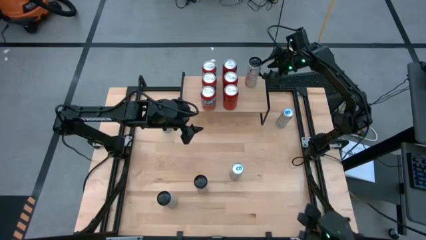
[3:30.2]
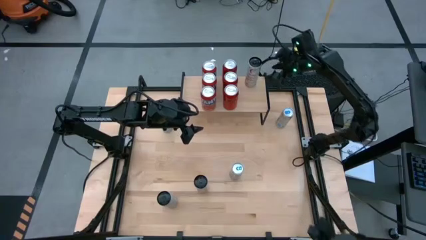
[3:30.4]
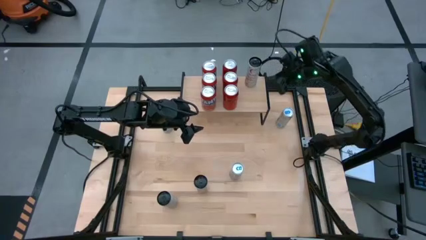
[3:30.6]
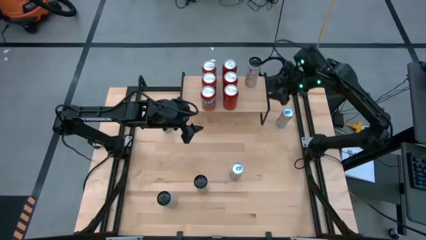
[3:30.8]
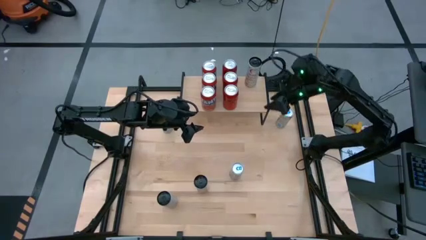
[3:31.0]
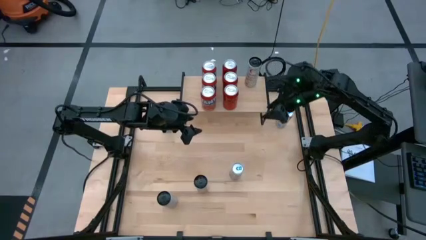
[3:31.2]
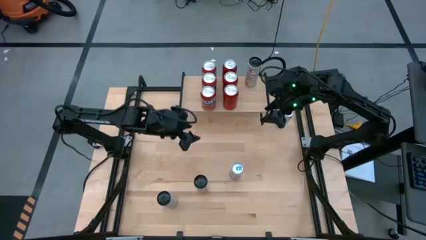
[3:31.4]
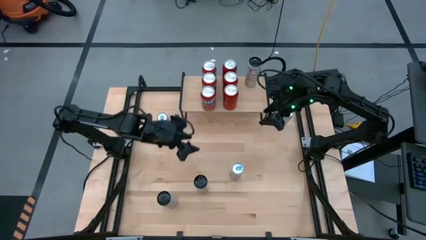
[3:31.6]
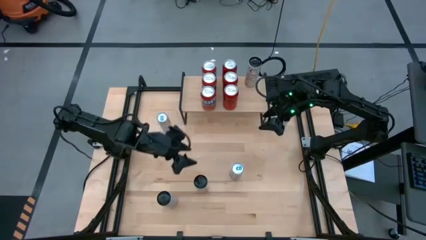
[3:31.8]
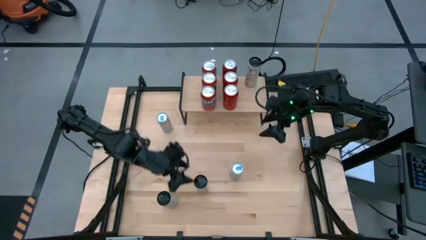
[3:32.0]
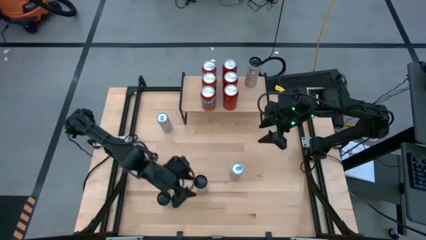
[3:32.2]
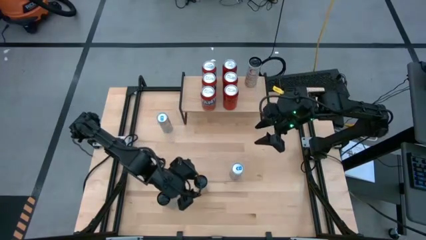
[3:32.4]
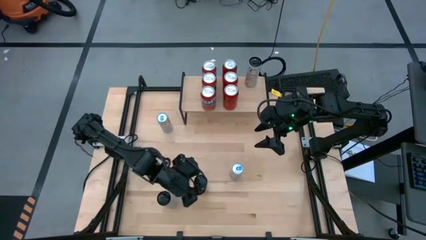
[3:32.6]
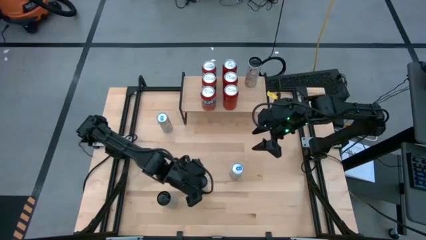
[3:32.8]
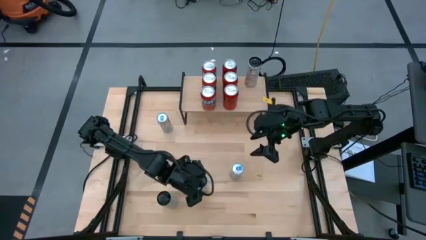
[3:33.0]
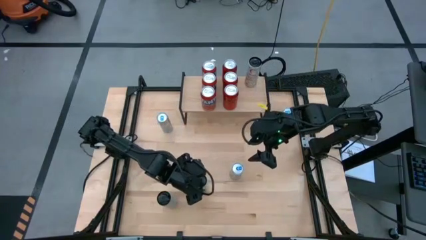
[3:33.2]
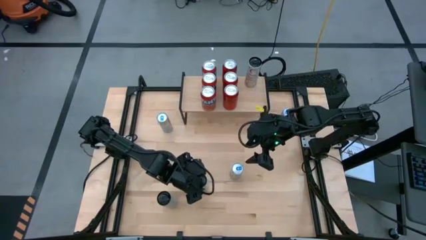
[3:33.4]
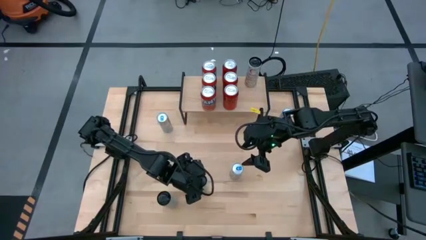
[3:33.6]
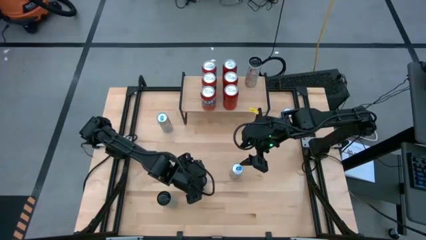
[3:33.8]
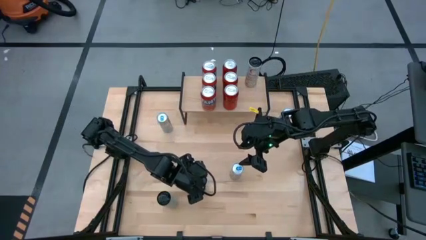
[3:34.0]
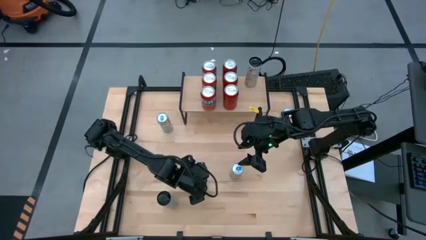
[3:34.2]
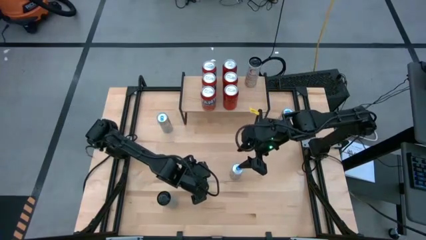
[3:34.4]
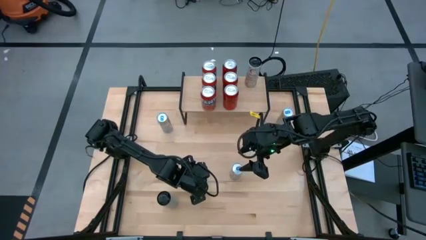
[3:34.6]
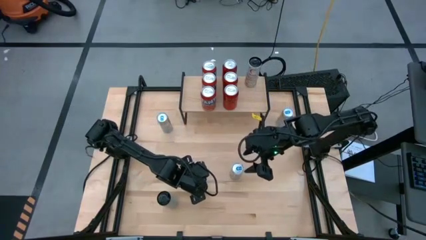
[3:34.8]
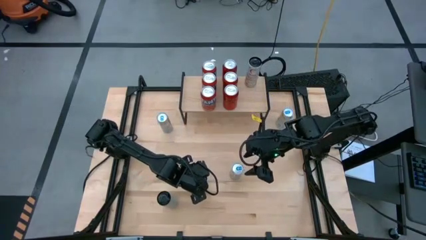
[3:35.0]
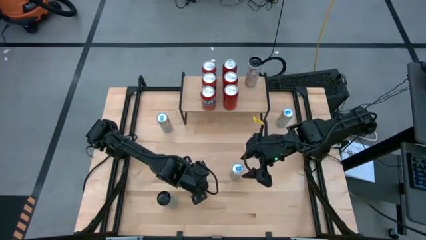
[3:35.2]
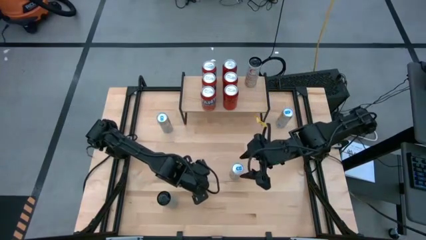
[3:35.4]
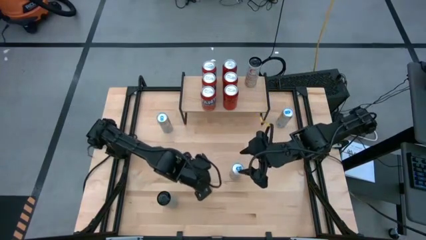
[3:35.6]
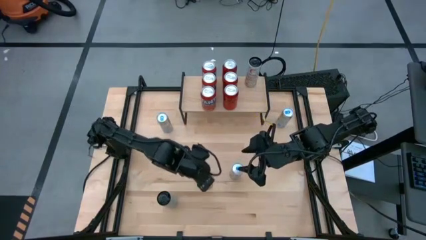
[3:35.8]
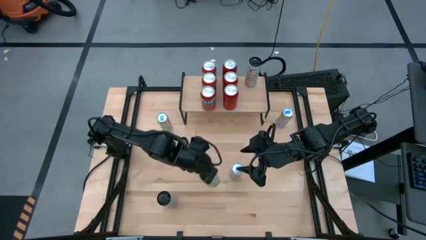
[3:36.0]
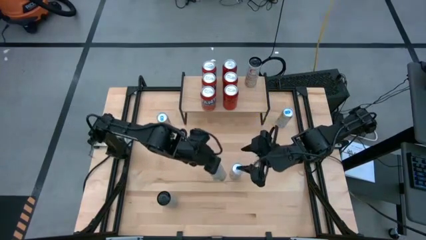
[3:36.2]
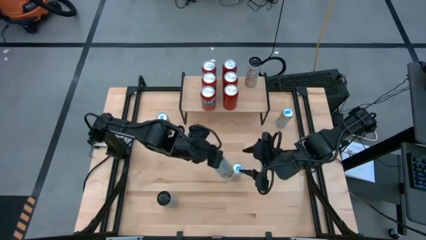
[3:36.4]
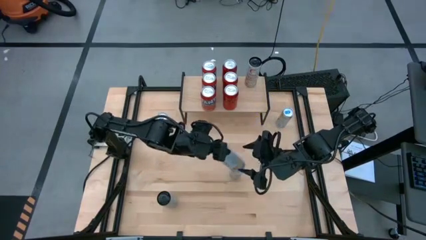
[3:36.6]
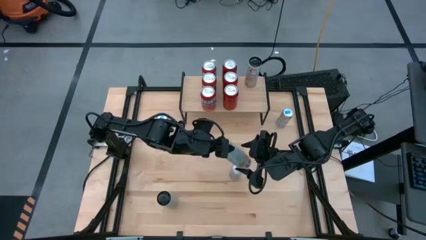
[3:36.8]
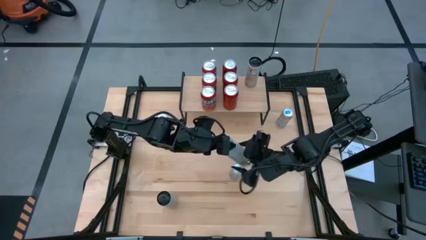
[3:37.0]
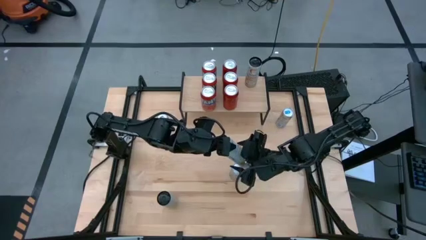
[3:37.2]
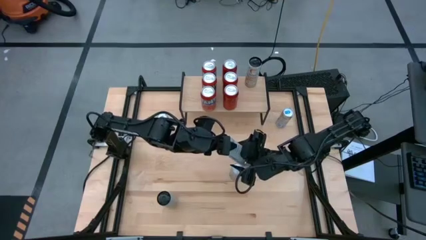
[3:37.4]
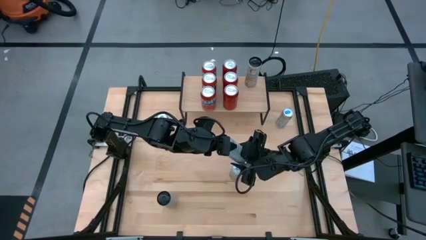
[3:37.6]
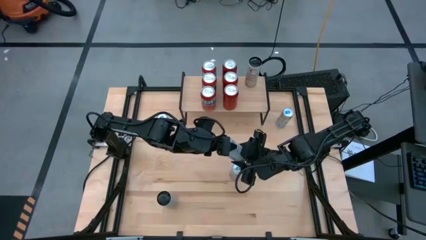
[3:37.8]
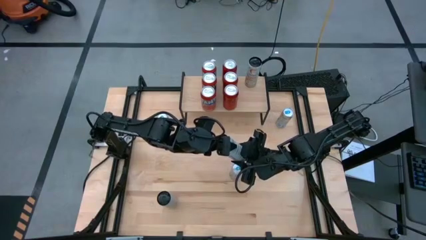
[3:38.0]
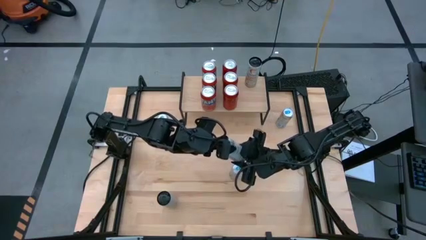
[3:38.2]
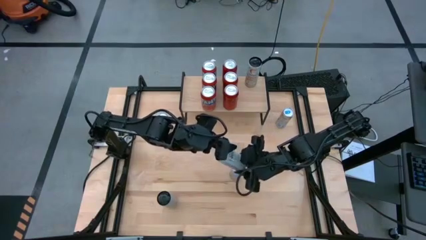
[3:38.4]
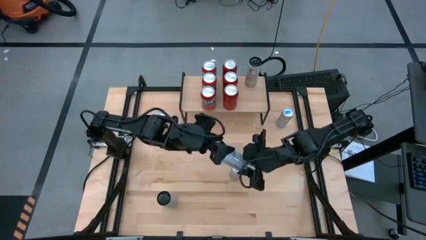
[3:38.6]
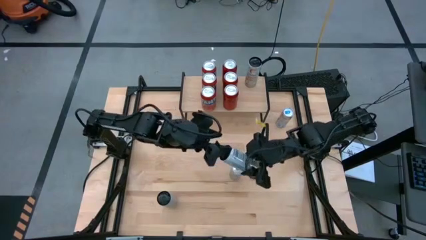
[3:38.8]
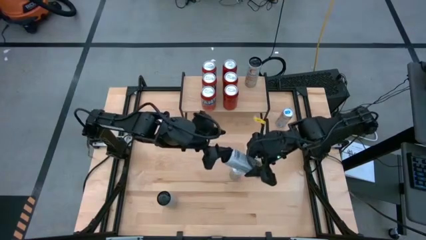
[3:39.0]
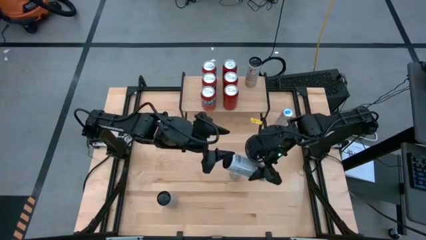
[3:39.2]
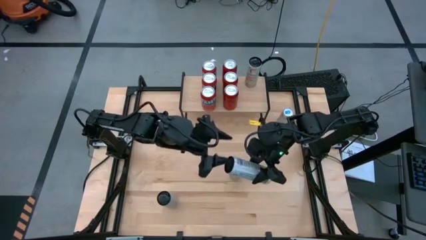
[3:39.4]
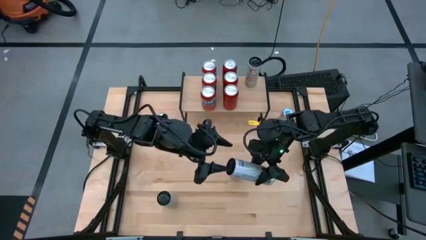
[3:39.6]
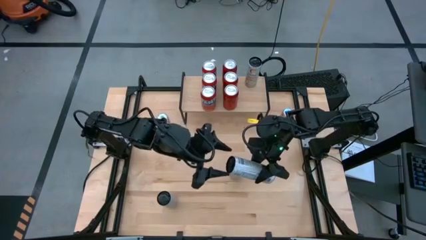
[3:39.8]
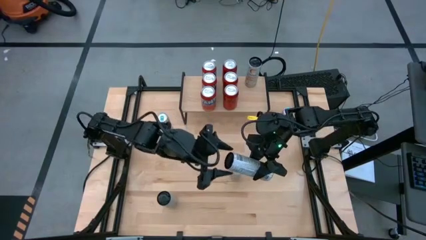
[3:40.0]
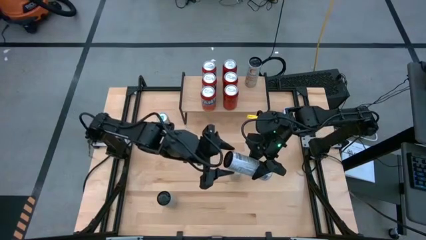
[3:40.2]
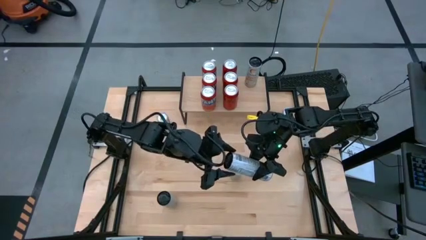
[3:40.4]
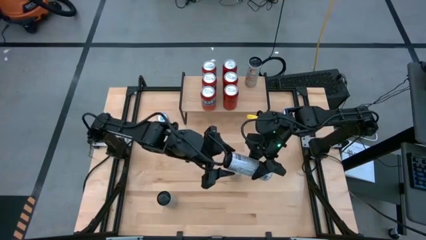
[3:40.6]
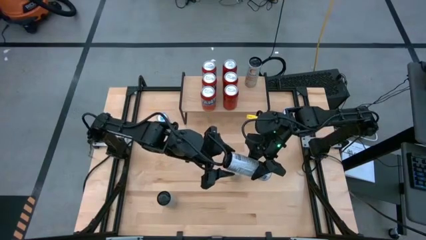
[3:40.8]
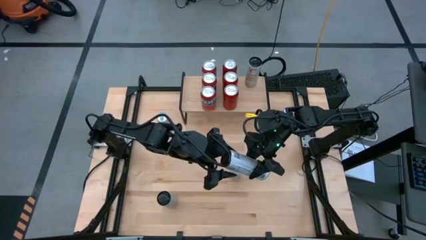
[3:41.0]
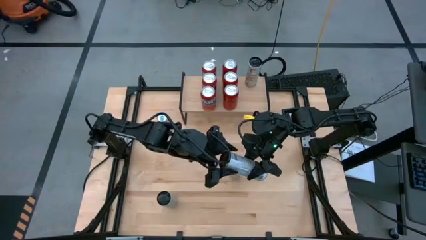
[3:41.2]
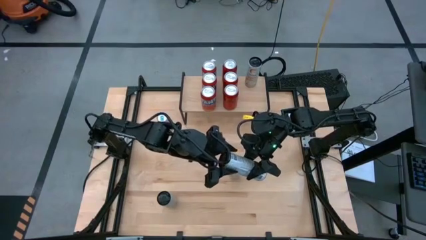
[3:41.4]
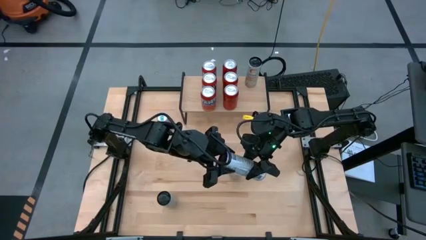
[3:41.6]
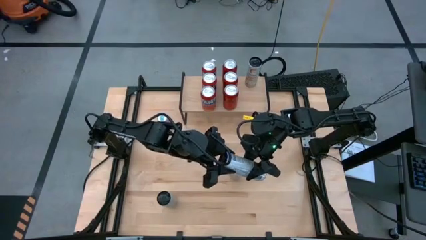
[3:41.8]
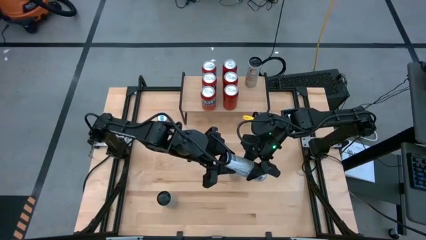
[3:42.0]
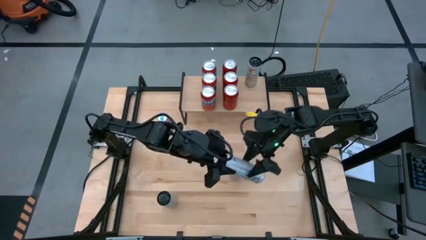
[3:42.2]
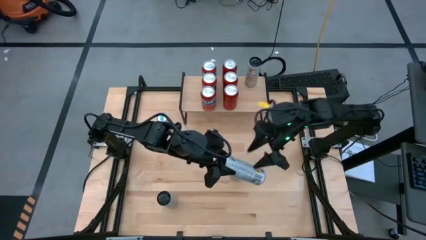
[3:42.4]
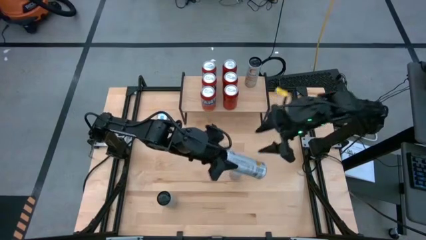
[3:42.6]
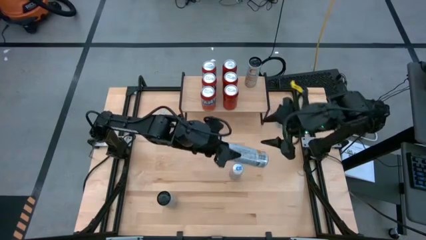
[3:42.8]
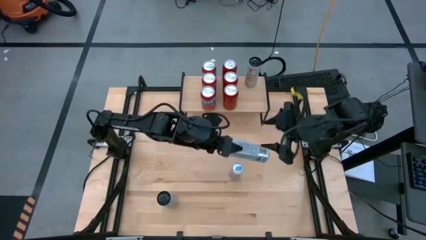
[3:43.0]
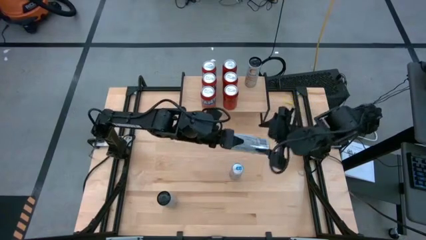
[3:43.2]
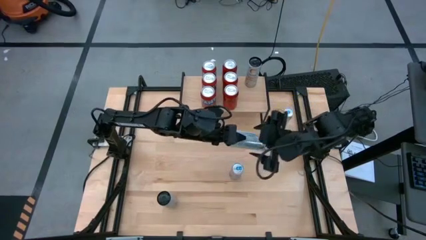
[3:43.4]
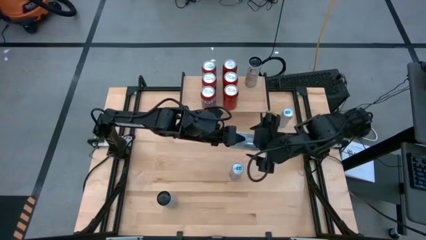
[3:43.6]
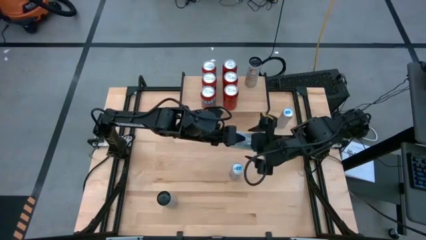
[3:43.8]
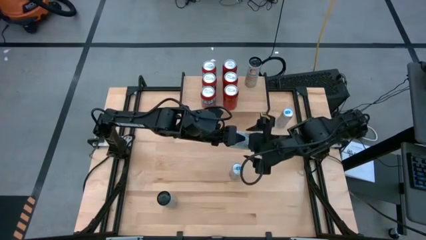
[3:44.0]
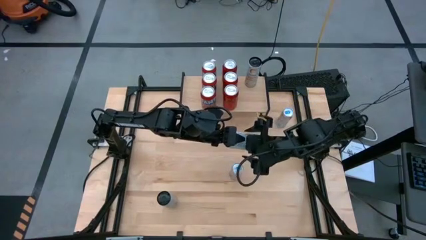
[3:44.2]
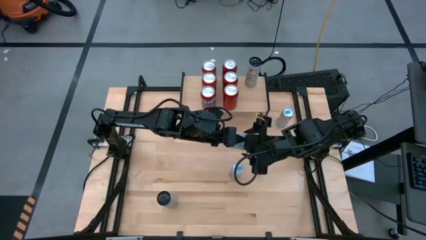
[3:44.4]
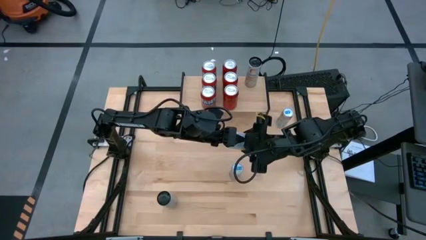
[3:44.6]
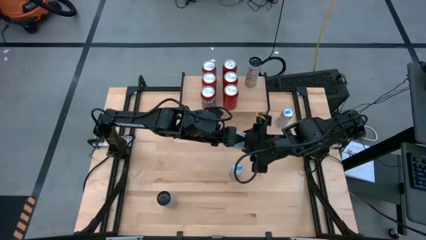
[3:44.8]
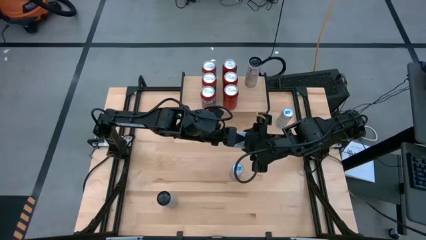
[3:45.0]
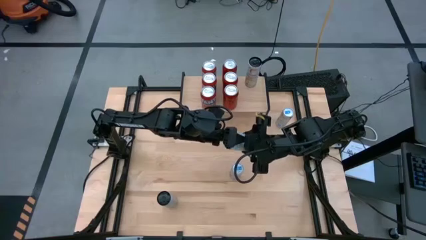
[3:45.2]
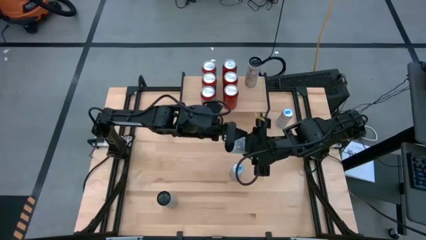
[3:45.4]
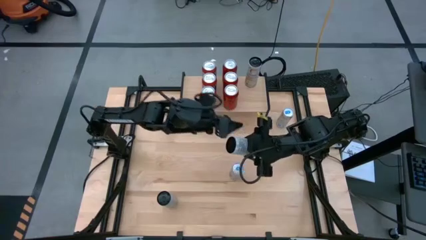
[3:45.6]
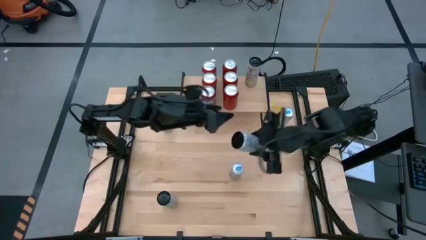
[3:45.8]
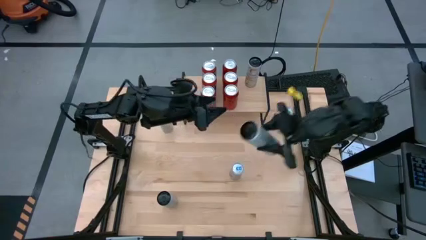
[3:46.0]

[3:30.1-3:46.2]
Task: Place canned beverage on shelf
Put the right white-yellow soda can on the shelf aligned with the other white-yellow soda can

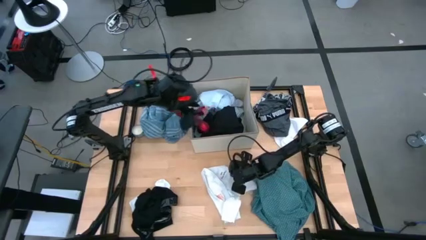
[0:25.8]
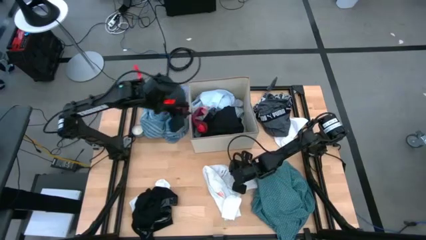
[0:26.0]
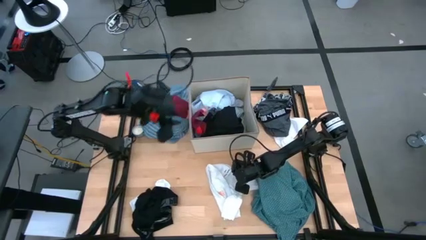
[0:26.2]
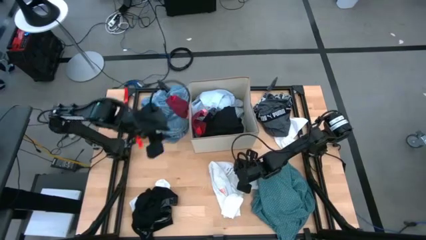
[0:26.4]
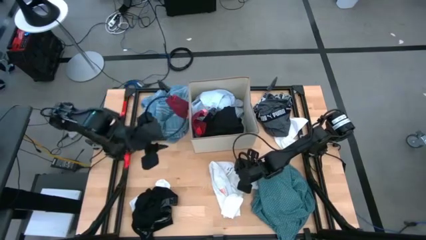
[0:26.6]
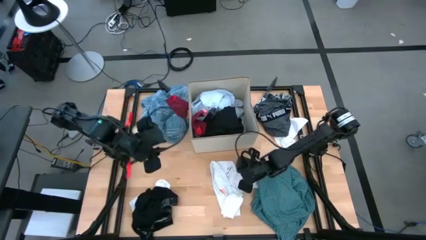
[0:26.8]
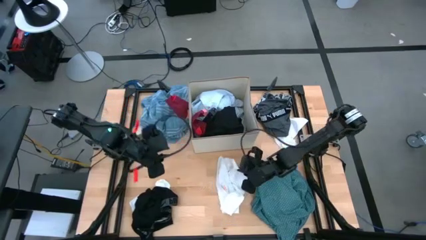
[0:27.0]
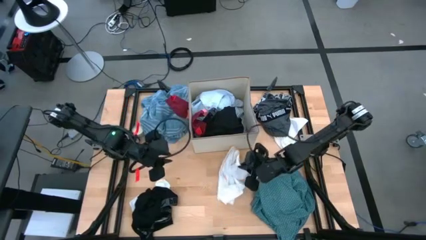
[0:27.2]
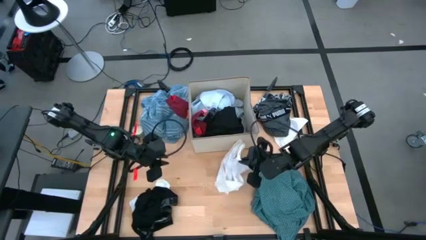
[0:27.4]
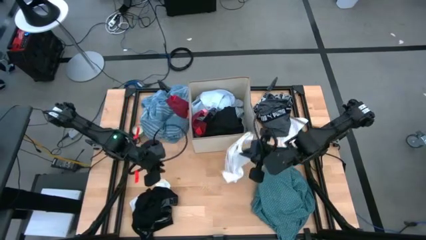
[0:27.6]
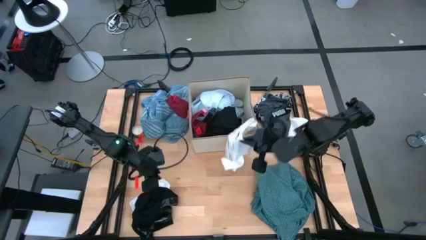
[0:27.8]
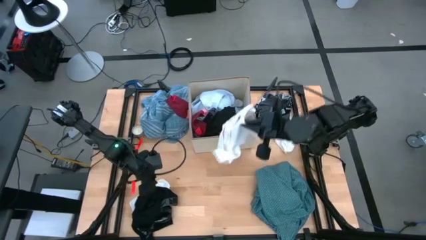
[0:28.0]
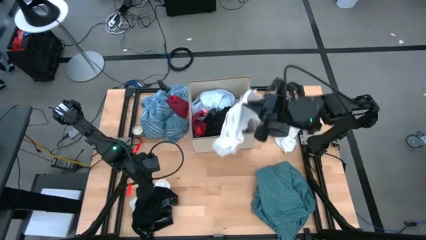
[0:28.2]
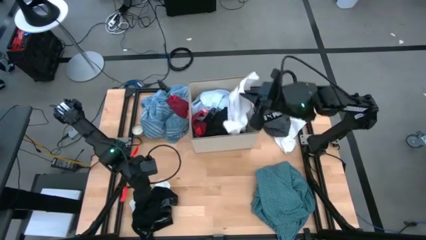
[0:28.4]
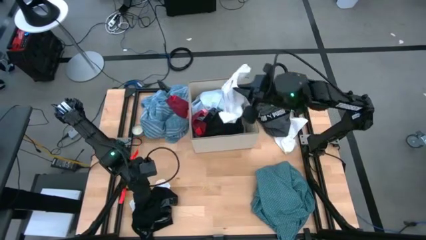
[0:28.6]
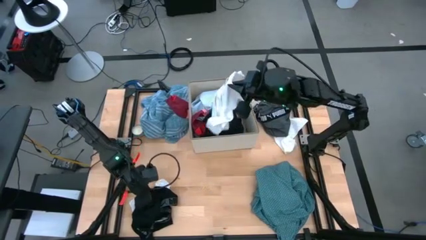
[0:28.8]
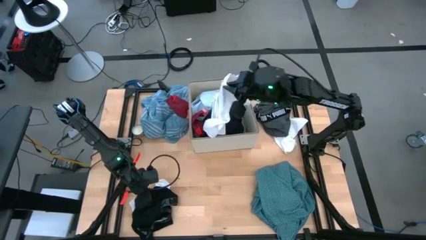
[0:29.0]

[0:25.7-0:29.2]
Task: Sort clothes
Put the white shorts into the bin
